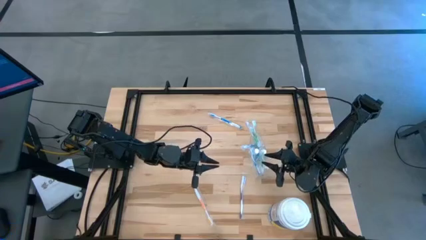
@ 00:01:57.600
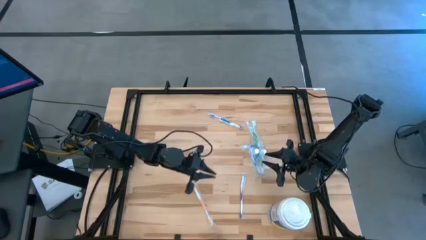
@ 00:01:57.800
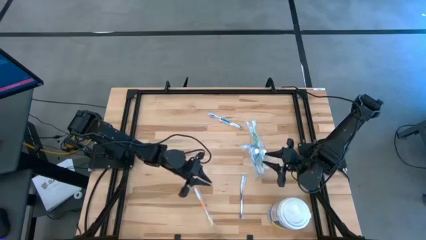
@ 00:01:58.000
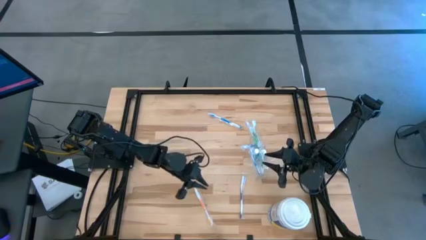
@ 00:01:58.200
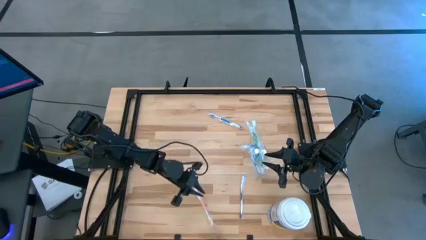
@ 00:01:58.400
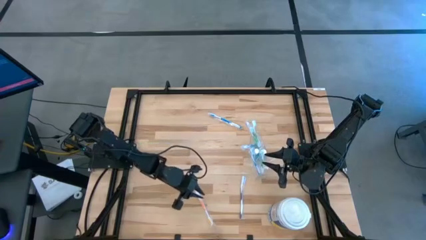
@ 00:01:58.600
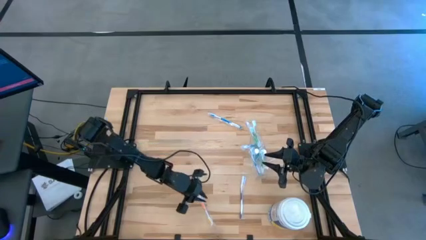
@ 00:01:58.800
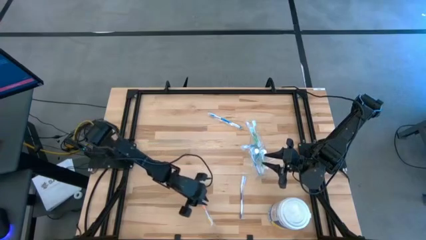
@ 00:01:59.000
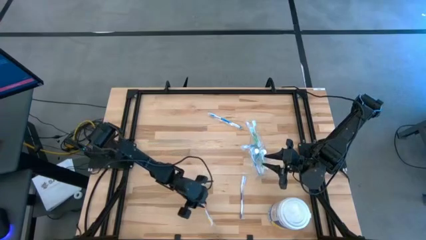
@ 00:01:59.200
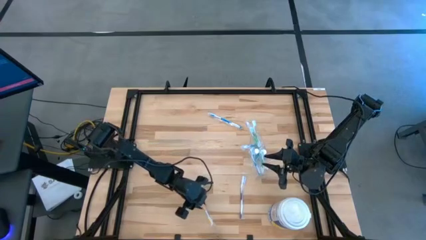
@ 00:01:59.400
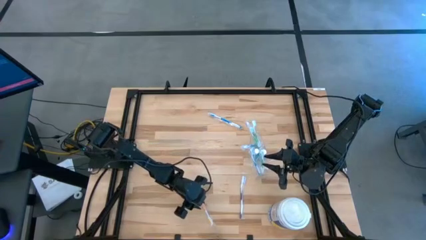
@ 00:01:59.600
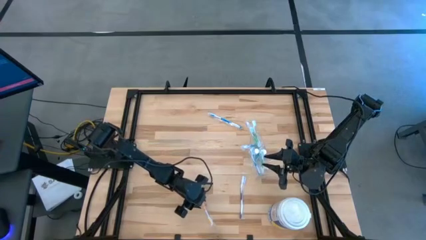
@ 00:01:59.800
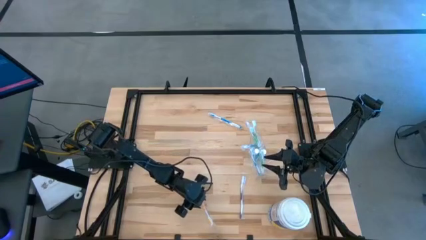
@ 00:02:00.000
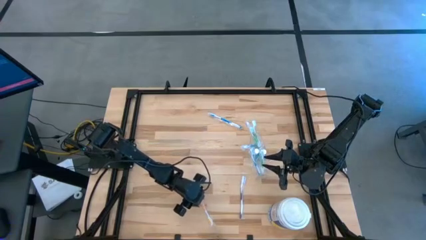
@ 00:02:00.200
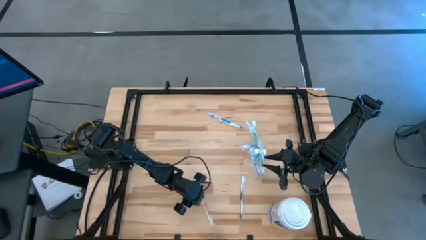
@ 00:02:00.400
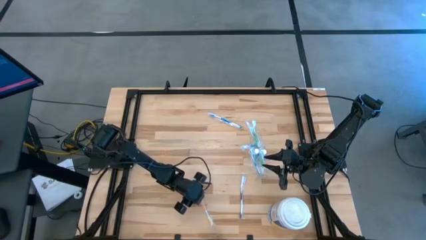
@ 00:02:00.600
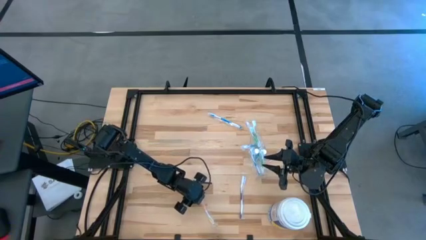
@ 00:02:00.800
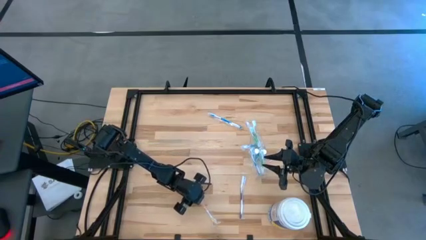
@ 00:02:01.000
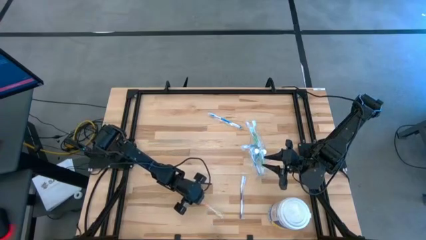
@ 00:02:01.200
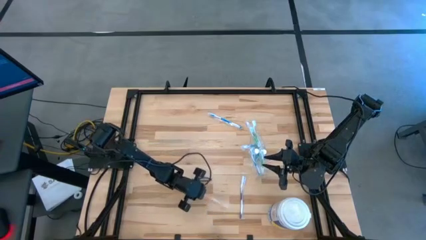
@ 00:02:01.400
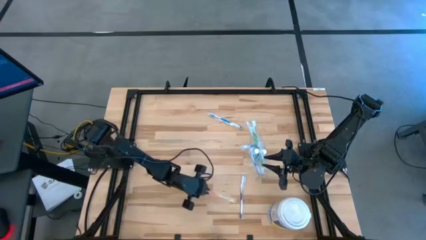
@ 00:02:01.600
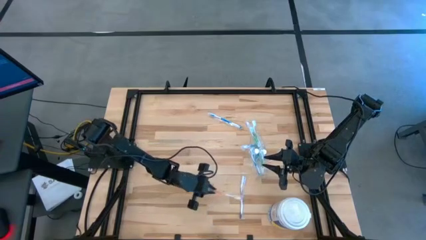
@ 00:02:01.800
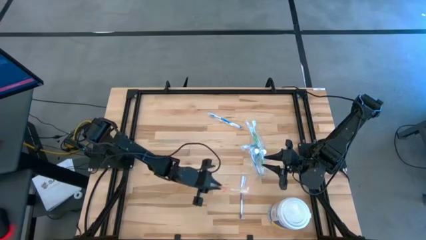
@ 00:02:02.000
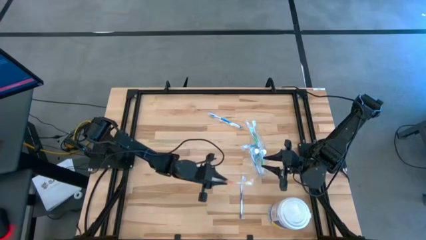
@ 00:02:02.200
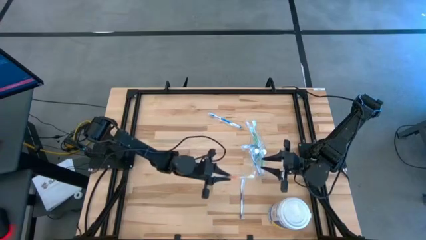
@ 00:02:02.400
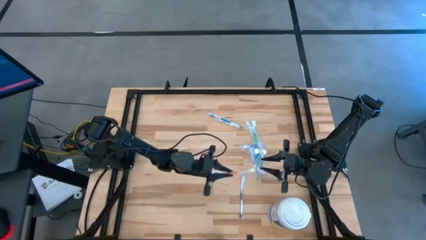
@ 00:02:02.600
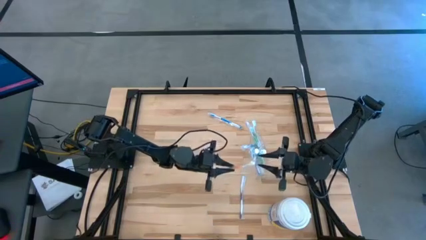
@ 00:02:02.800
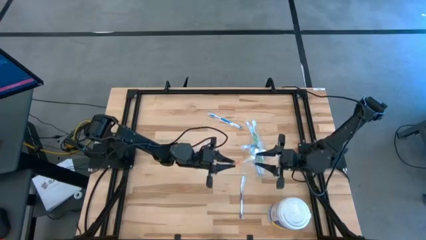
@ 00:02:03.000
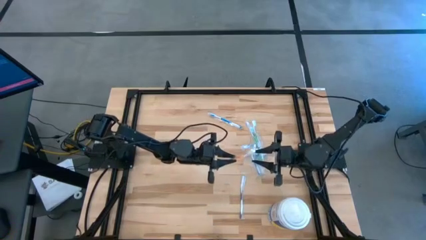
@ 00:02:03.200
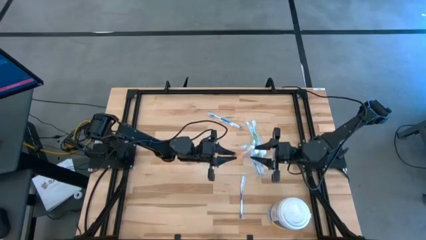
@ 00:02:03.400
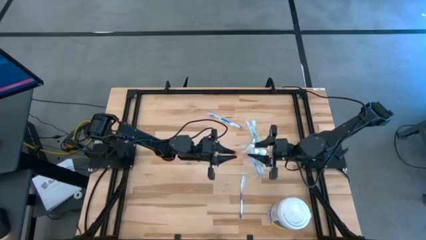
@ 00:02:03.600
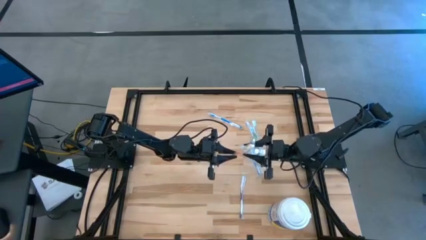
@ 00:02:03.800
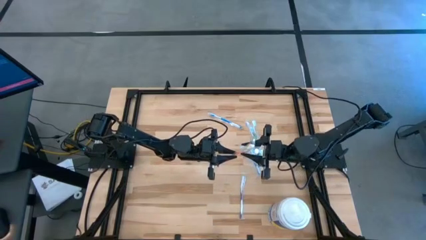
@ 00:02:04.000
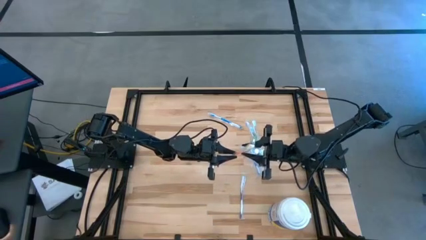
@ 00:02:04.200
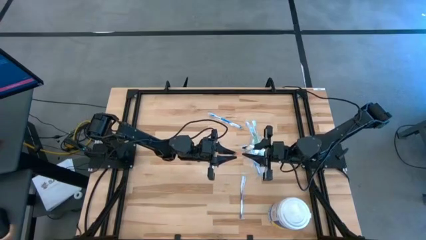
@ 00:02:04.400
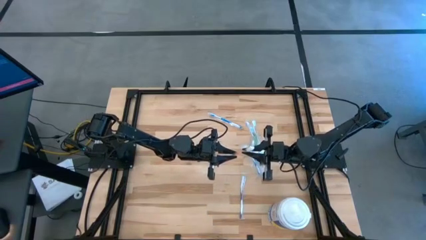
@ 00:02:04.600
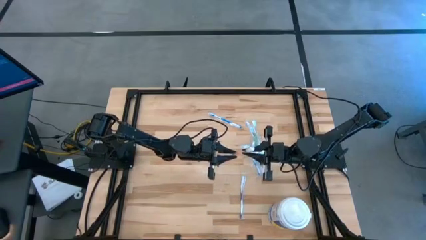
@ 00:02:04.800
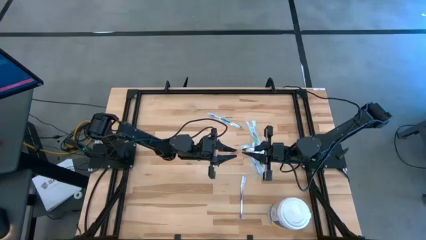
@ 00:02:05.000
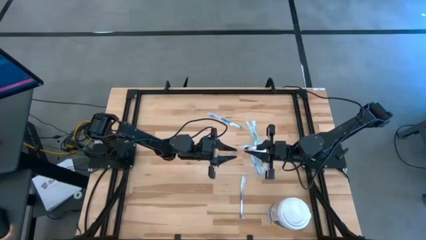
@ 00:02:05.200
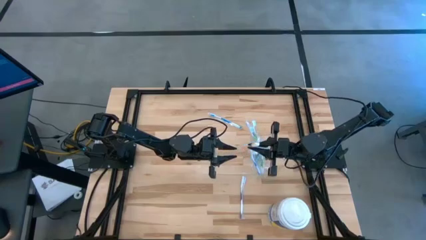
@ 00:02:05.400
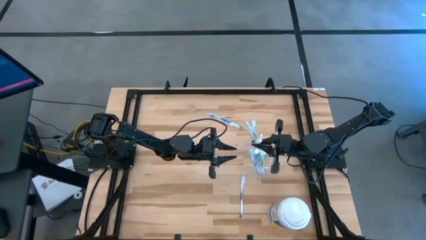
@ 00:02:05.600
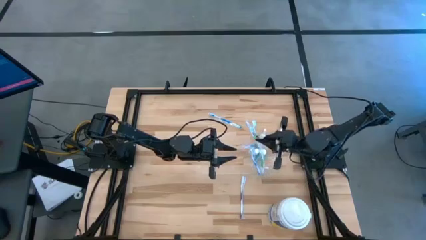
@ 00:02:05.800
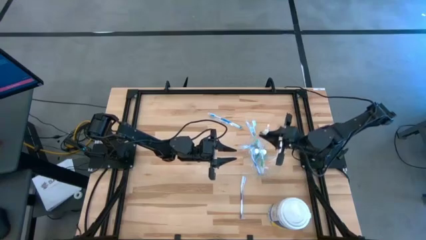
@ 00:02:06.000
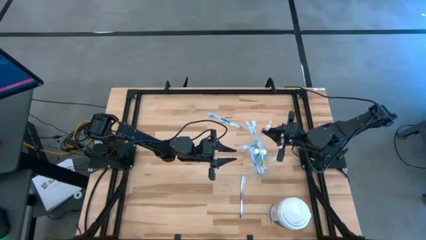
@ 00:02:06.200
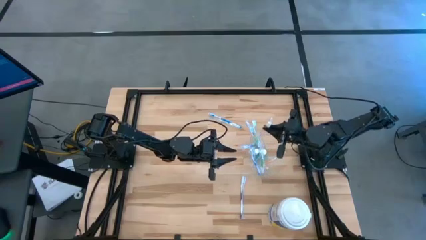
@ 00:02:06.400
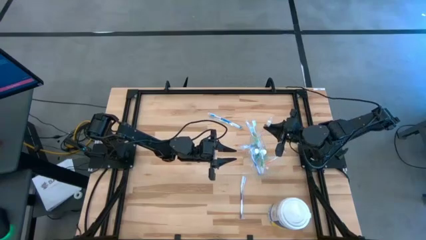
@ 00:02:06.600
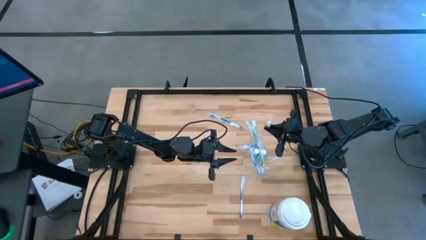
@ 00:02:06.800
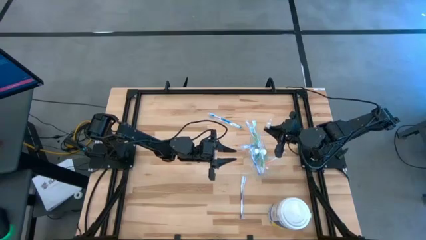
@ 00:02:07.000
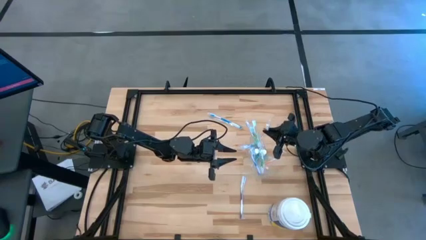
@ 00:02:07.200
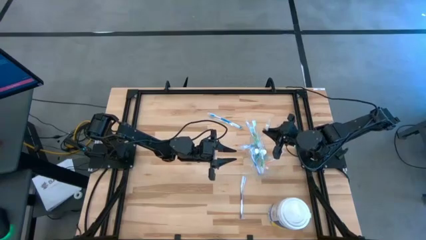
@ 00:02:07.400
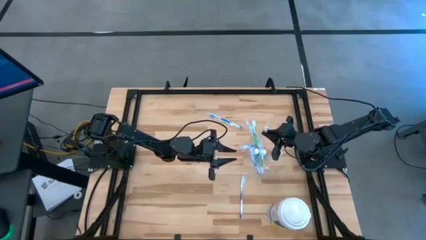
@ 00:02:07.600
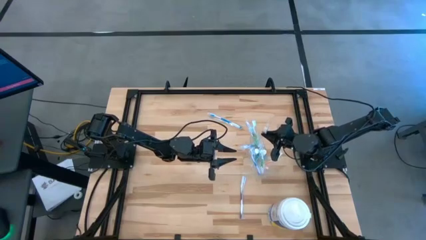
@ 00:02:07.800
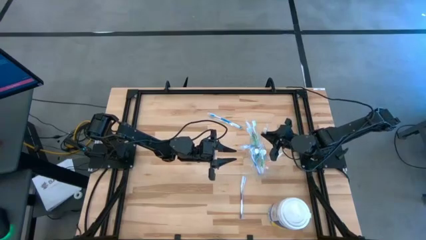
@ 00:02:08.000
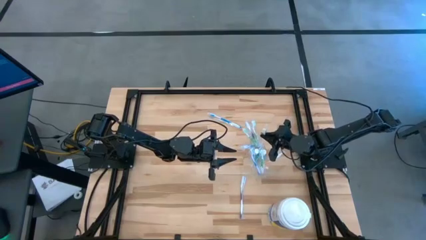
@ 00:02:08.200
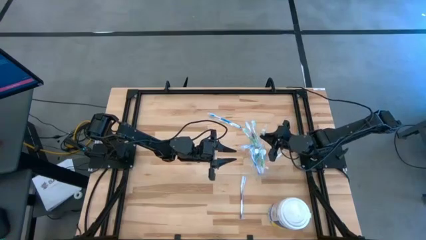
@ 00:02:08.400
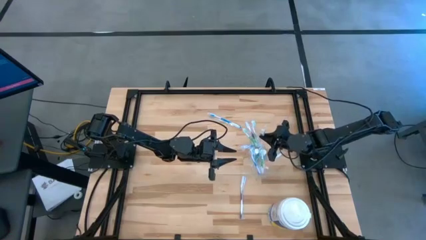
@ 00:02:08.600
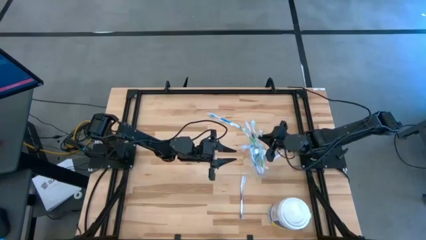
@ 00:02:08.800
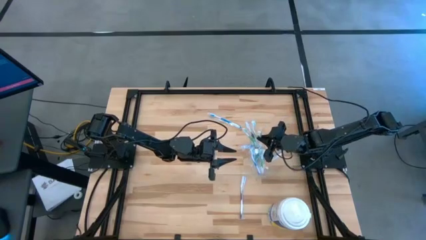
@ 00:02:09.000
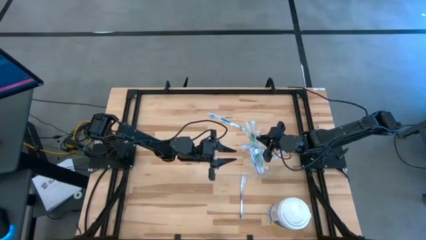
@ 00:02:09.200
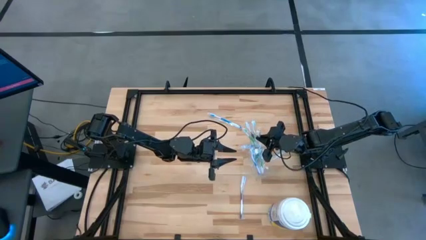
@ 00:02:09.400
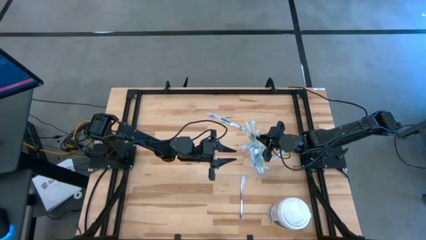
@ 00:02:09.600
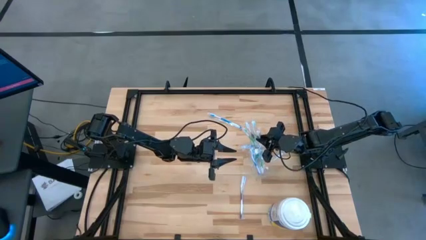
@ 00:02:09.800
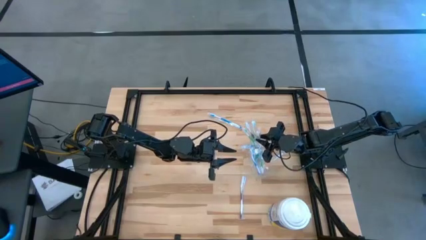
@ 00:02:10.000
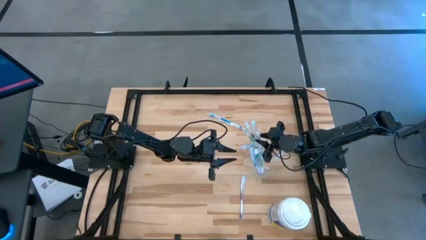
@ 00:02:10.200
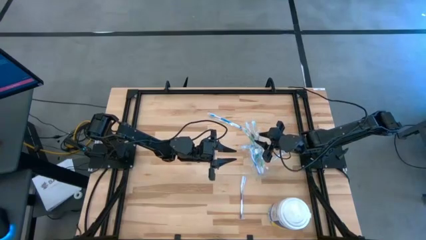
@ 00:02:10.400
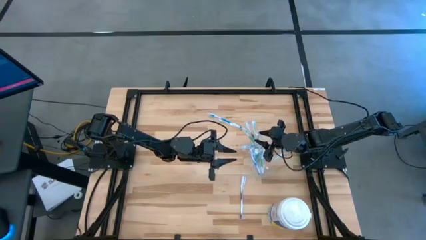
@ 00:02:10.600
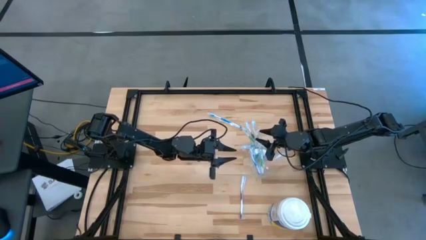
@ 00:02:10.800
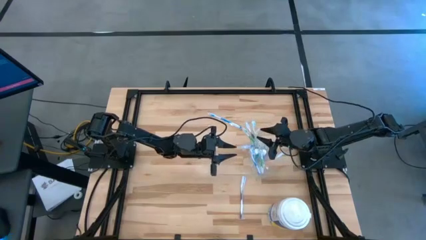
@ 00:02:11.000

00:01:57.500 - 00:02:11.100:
Task: Pick & Place toothbrushing station
Put the orange toothbrush into the top part transparent organizer

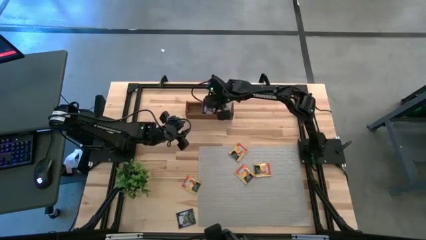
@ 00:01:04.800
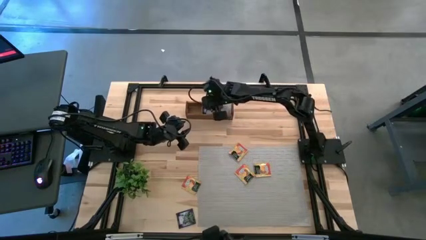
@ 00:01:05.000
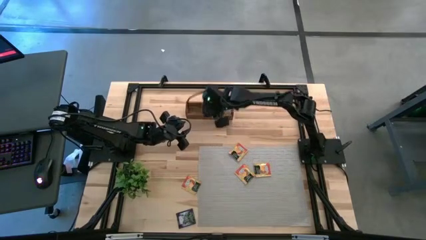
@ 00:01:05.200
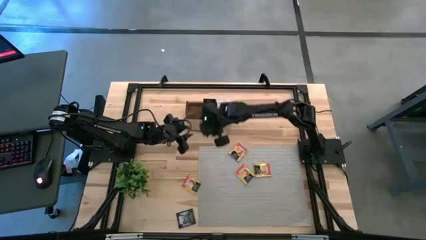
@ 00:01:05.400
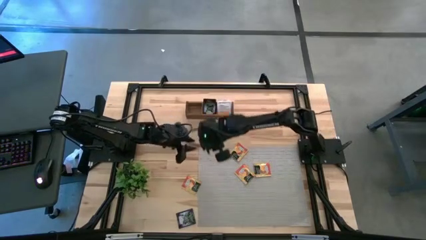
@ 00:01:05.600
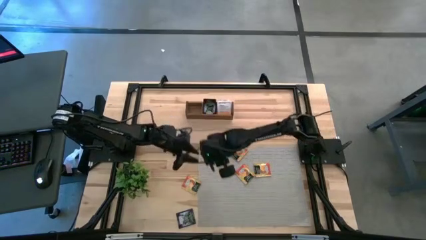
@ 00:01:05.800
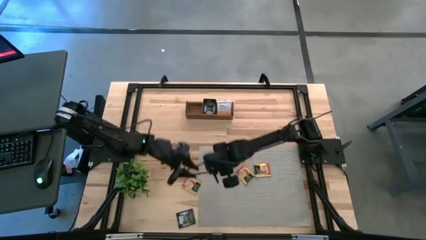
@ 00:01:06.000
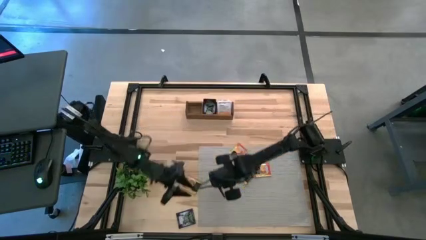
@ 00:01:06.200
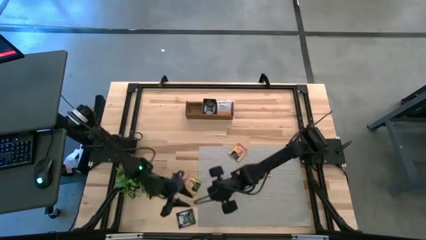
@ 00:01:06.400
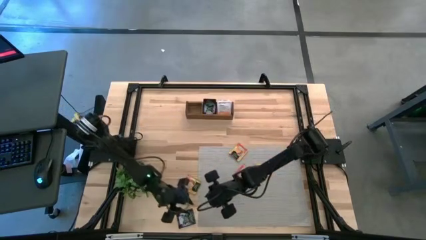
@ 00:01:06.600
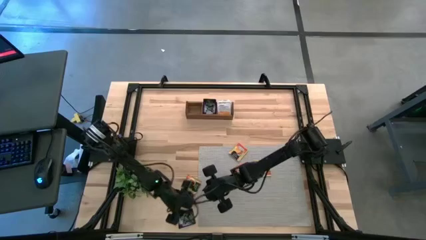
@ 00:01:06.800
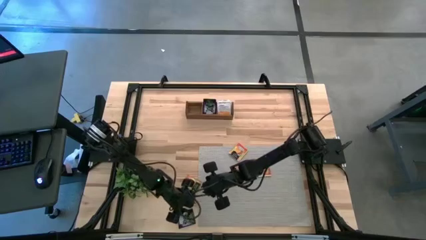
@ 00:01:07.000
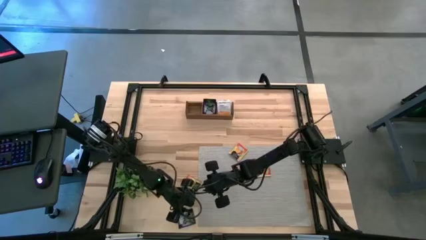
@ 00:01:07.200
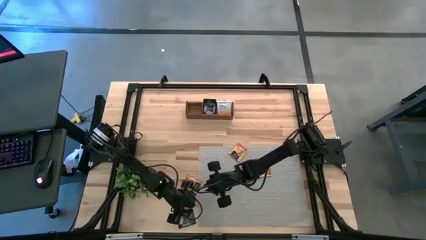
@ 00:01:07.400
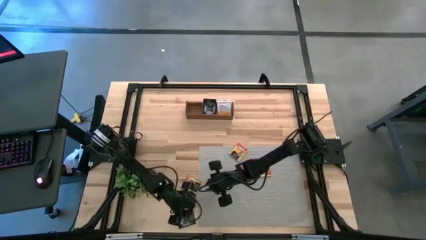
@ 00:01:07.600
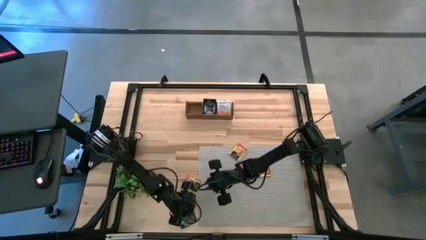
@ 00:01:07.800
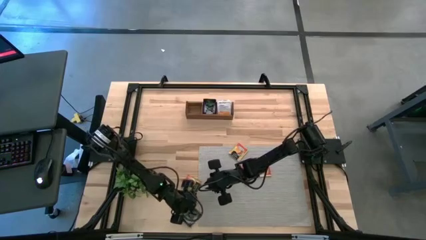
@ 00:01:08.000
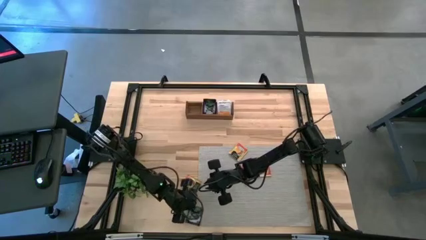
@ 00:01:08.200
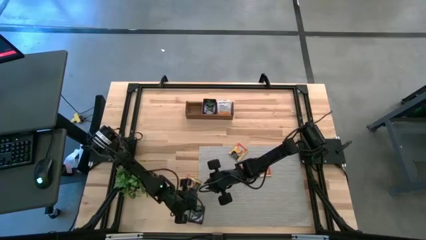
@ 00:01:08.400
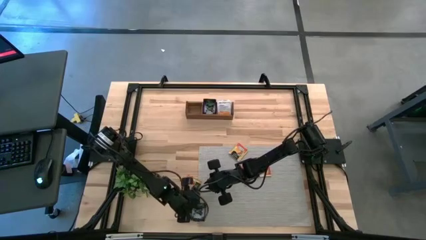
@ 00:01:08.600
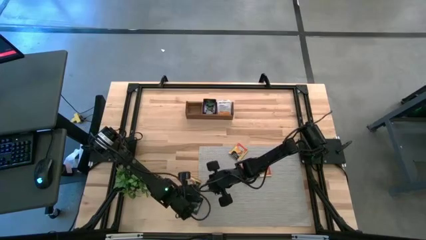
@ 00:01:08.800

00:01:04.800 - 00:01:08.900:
Task: Pick & Place Tea
Put the black tea bag into the middle section of the wooden organizer
